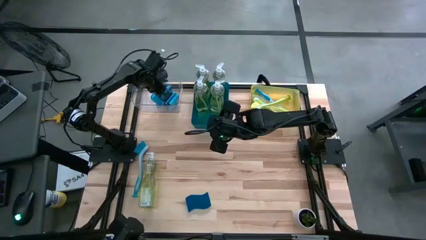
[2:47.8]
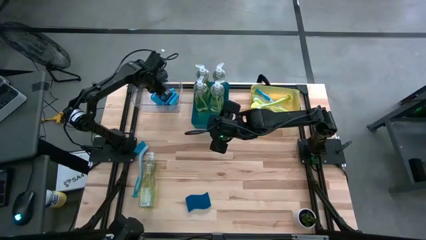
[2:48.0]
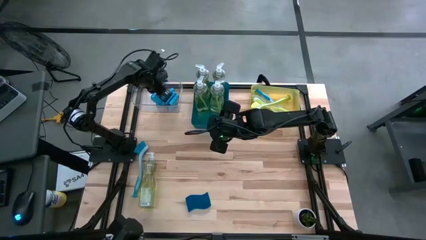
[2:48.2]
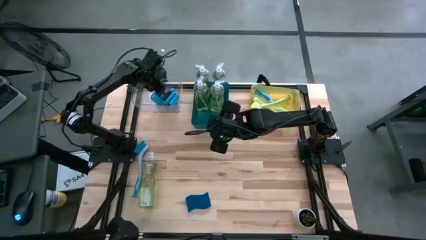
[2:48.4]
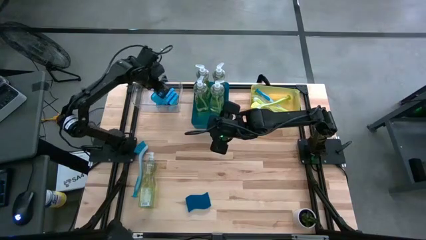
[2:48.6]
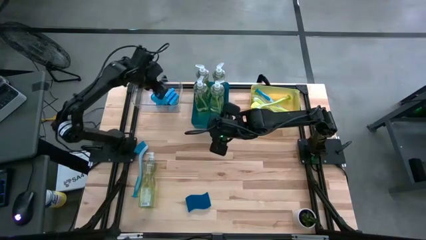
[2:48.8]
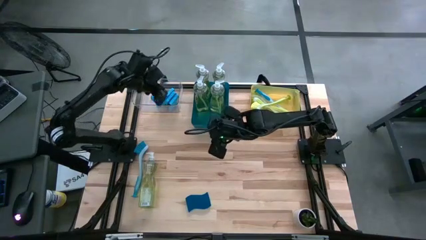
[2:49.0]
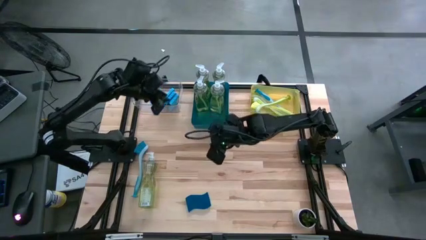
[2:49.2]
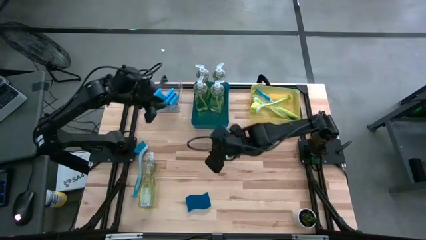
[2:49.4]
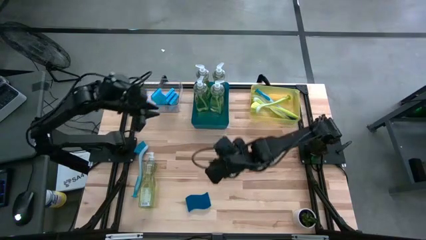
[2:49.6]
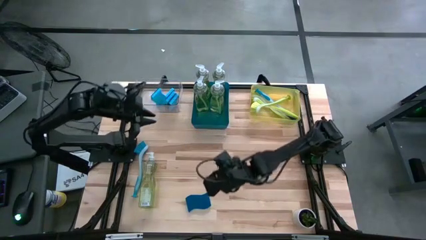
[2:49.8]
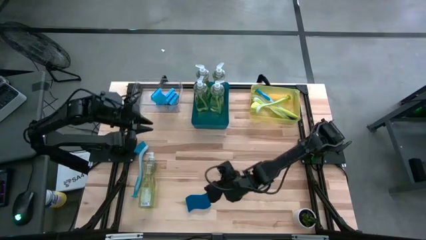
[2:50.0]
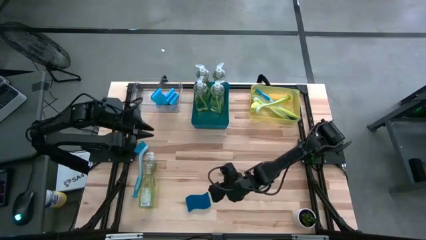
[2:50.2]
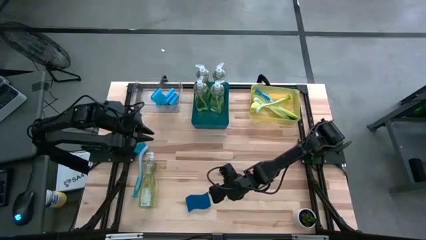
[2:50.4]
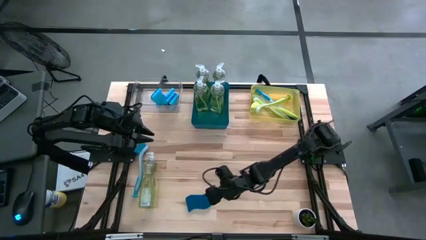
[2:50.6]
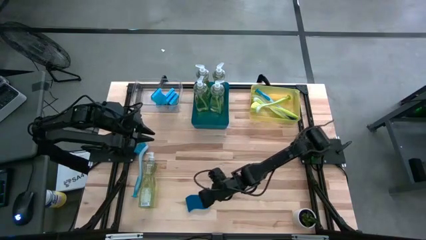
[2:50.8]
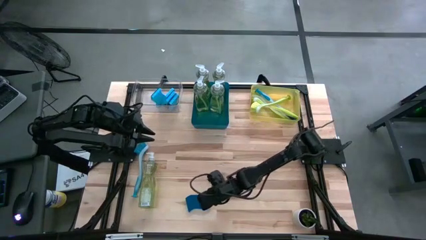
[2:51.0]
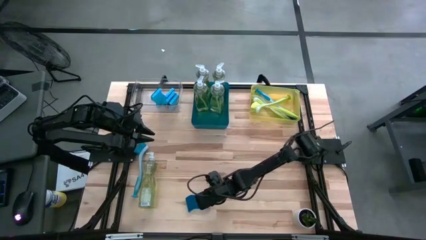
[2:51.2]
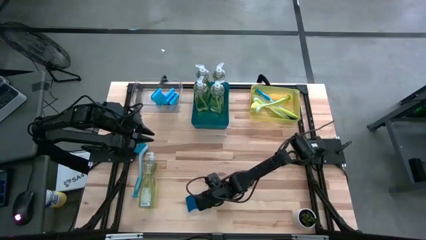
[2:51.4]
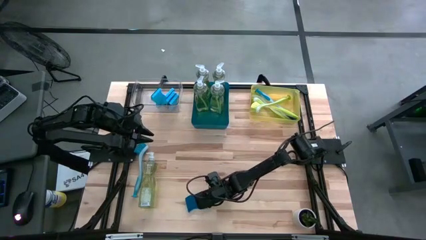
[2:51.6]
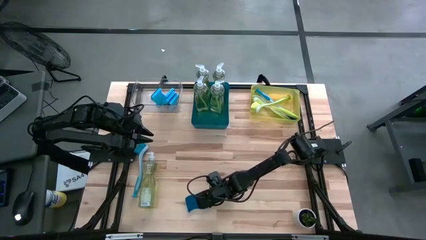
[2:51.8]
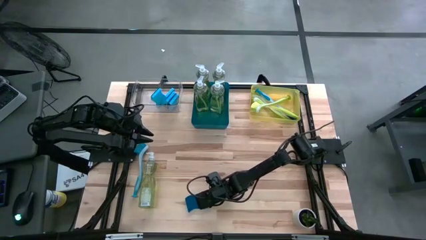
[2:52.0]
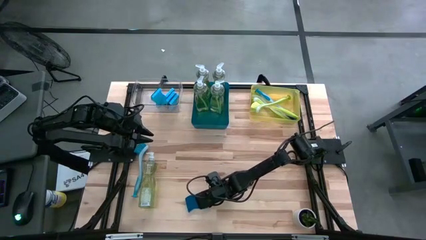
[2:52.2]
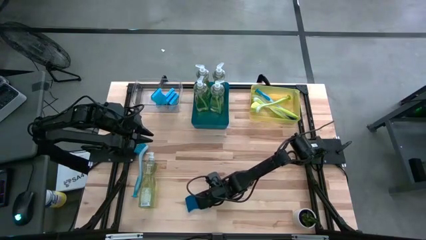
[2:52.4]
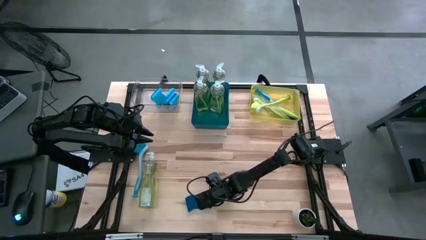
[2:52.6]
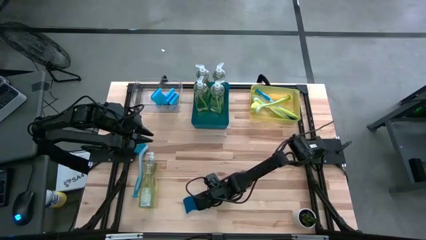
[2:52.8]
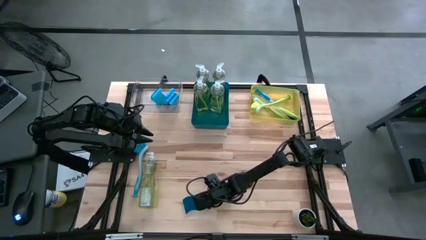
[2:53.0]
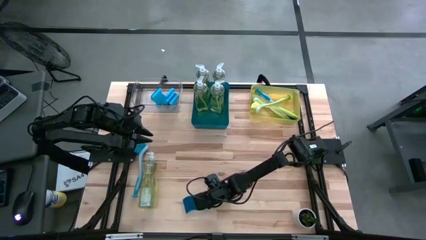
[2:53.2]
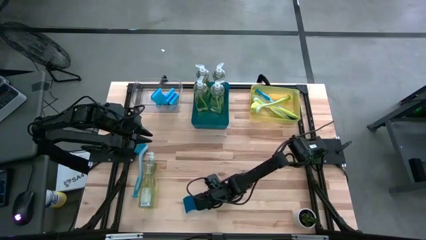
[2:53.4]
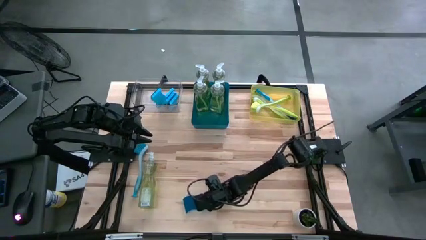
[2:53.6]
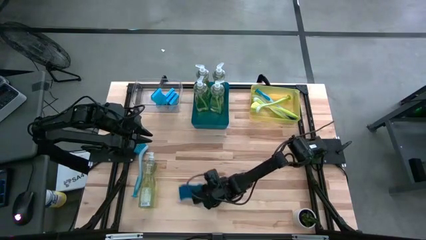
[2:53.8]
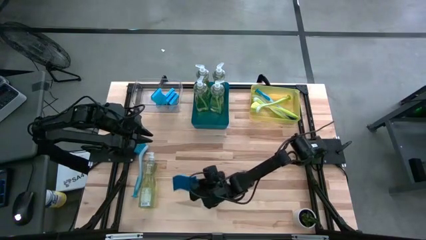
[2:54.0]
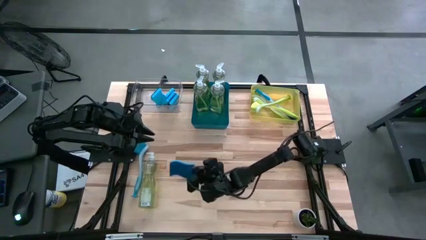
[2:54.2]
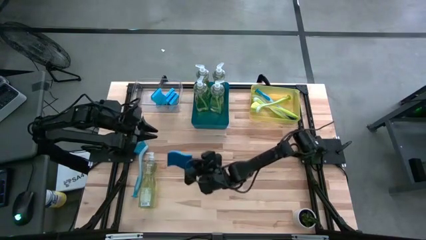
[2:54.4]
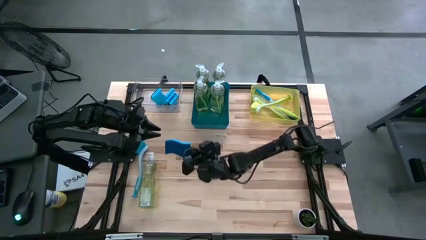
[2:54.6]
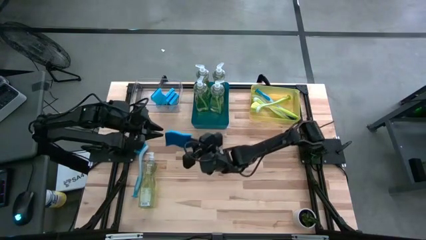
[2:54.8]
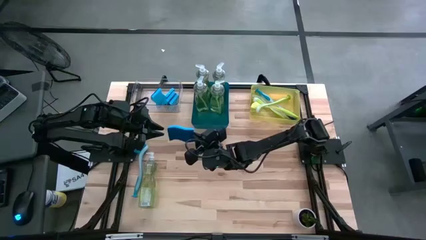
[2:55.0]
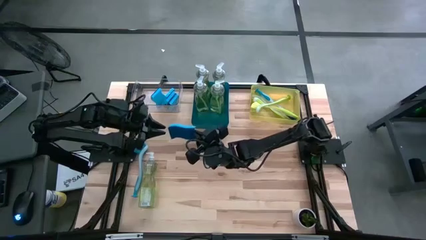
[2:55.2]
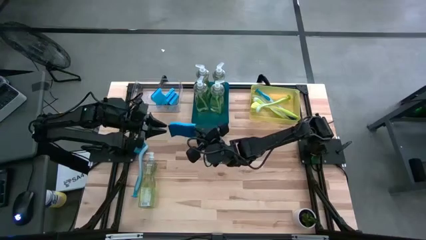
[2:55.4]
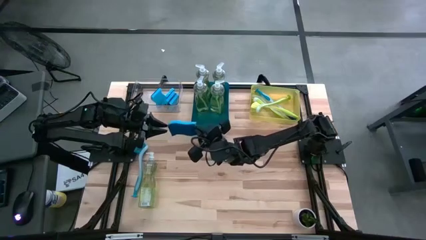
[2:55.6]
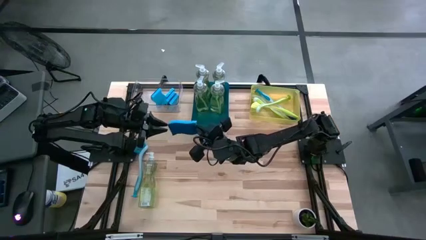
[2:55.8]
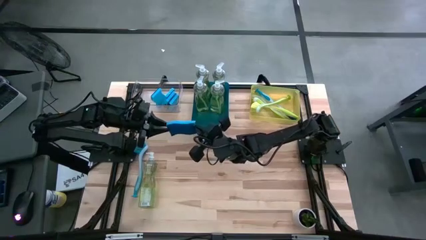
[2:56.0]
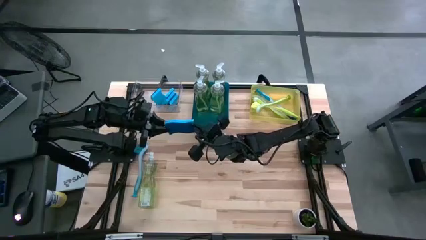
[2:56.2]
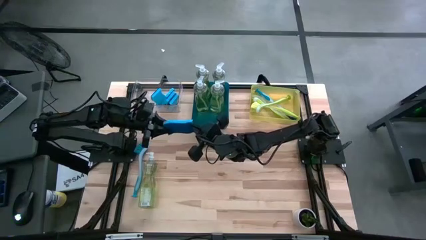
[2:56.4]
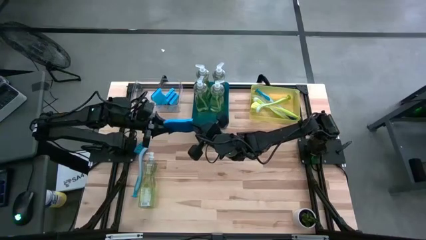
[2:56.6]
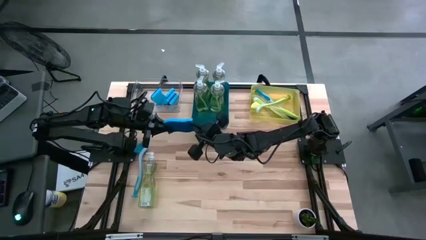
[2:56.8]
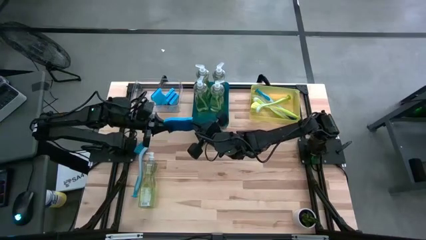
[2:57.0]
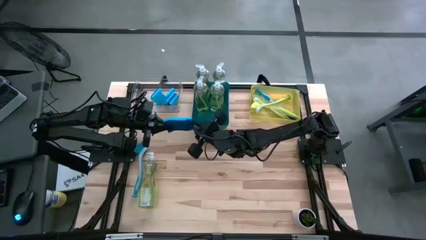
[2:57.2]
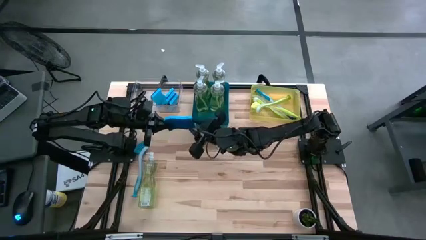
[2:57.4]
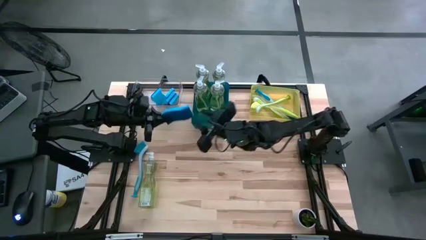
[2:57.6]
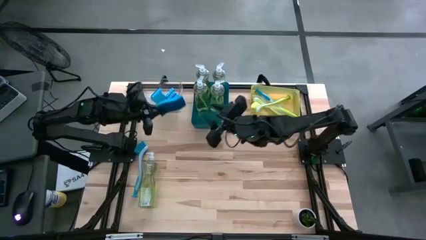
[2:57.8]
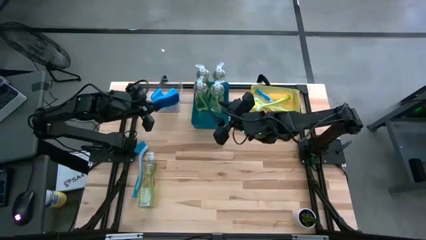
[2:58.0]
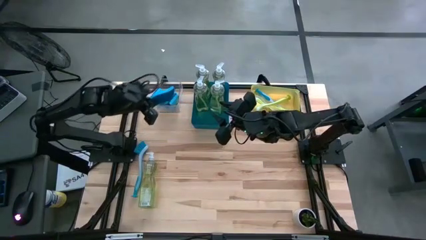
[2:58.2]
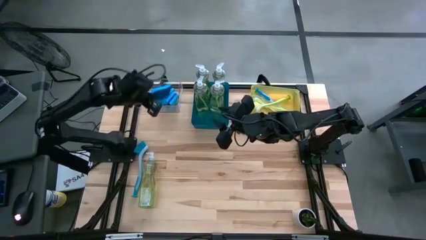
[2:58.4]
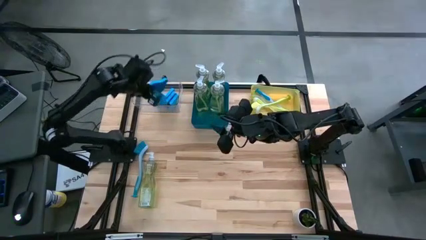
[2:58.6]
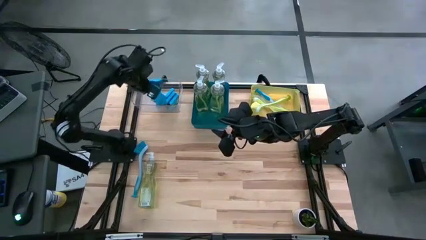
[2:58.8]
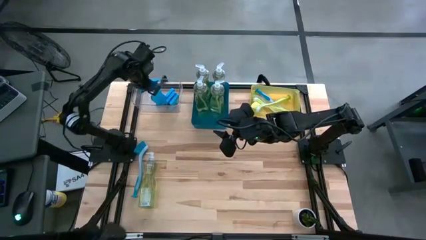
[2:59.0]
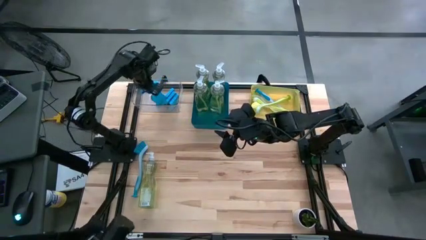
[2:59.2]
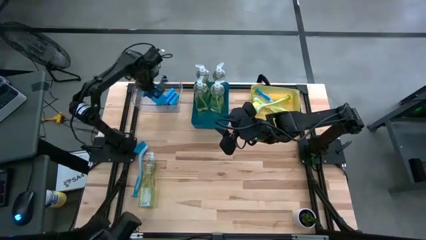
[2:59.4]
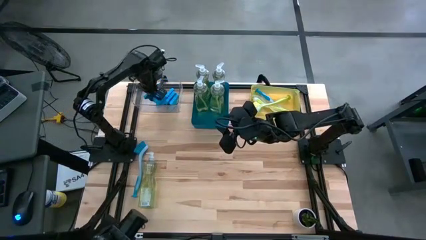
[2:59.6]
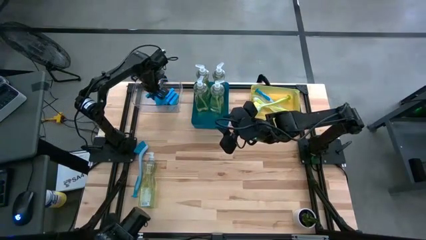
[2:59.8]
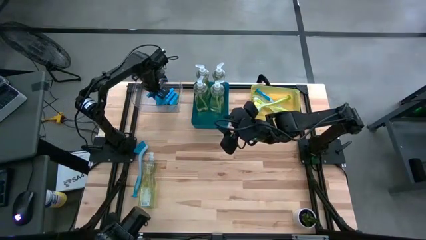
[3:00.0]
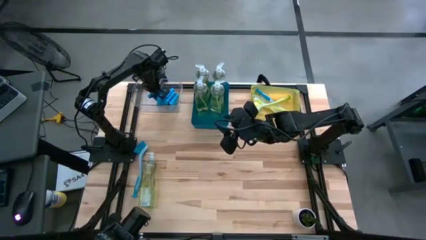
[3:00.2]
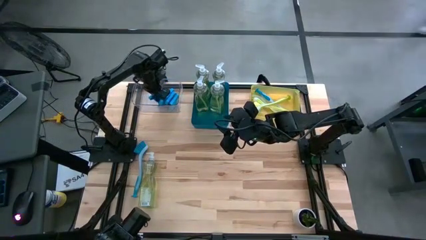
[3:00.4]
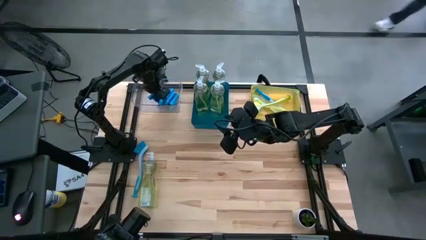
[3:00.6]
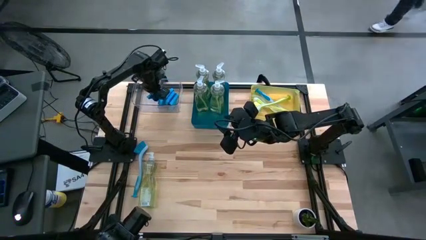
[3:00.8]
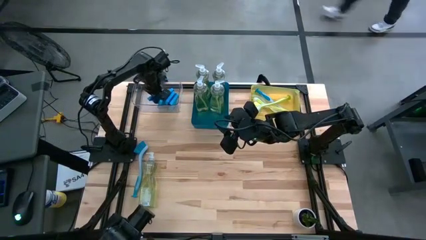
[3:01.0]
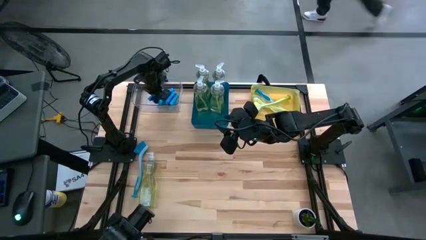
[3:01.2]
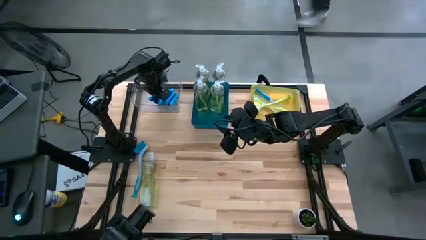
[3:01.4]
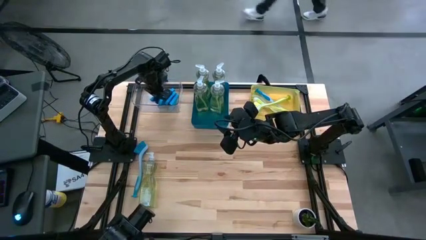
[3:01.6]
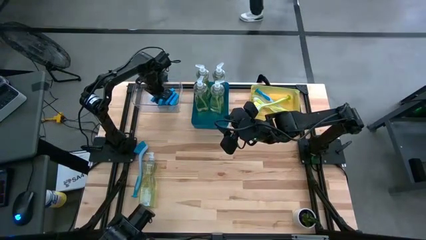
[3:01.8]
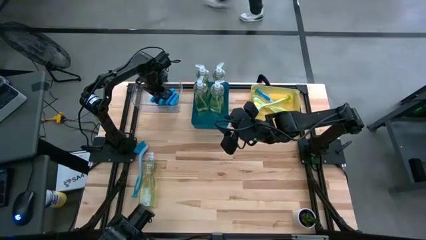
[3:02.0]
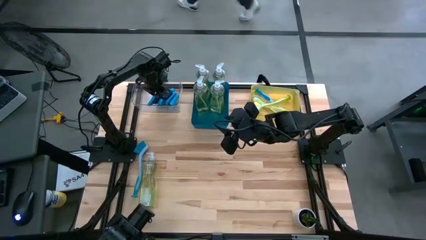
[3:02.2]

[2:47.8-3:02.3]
Task: Pick & Place Kitchen Sink Supplies
Put the blue sponge into the transparent bin
